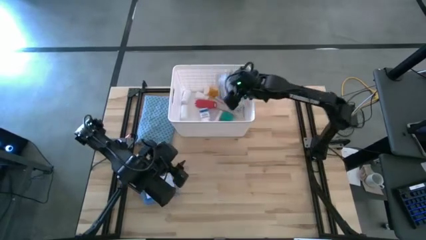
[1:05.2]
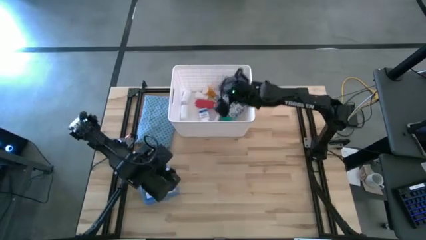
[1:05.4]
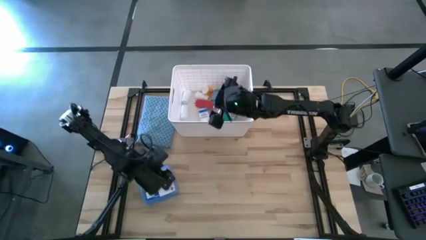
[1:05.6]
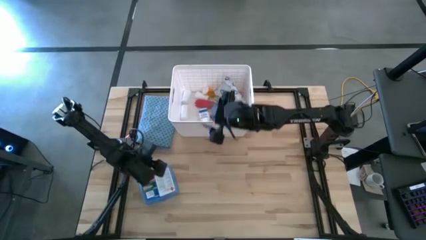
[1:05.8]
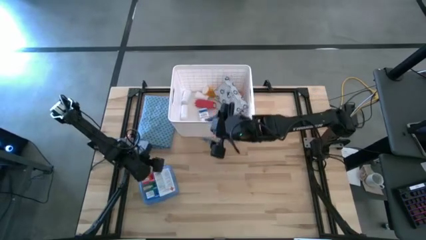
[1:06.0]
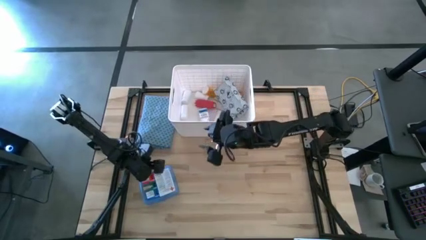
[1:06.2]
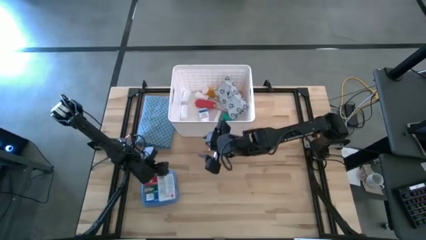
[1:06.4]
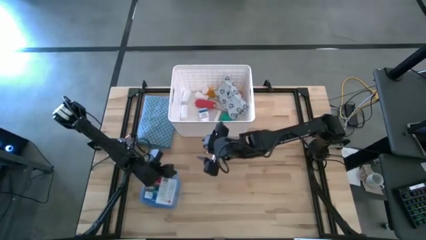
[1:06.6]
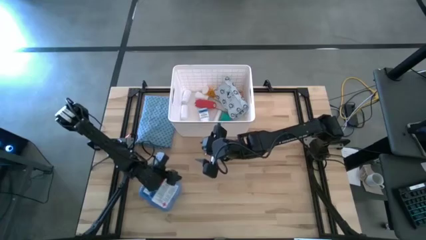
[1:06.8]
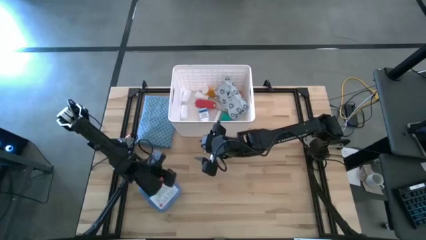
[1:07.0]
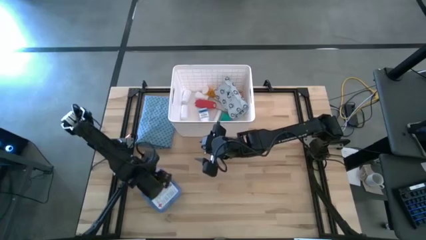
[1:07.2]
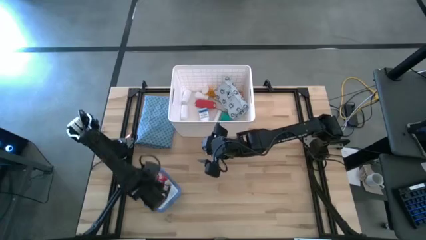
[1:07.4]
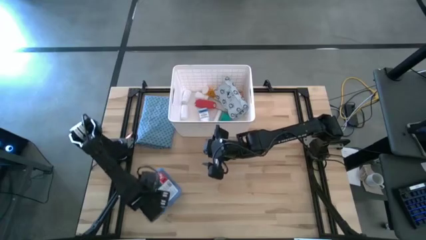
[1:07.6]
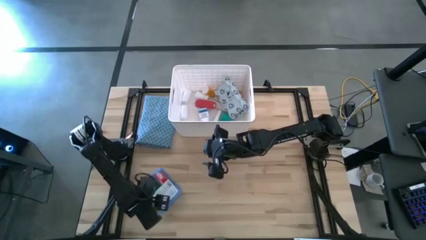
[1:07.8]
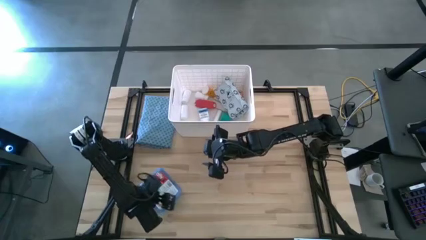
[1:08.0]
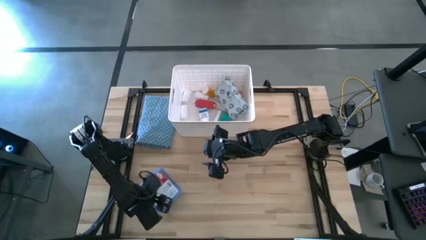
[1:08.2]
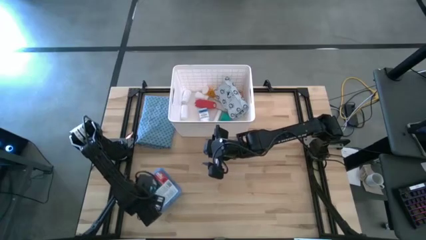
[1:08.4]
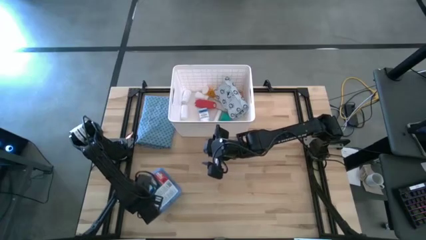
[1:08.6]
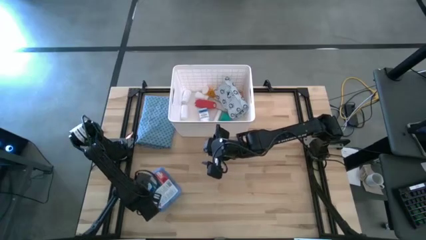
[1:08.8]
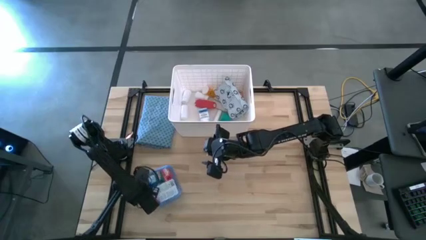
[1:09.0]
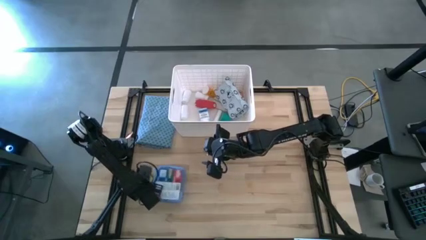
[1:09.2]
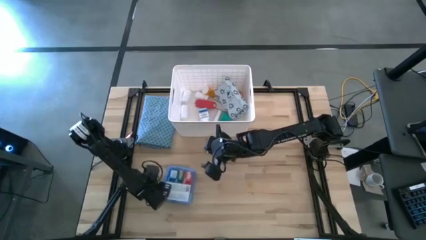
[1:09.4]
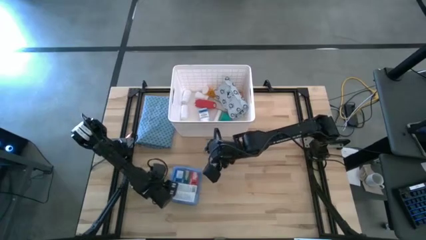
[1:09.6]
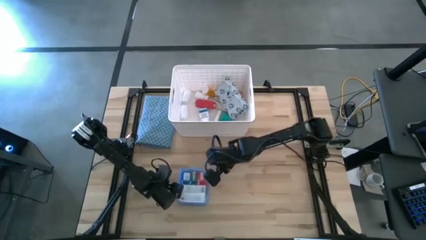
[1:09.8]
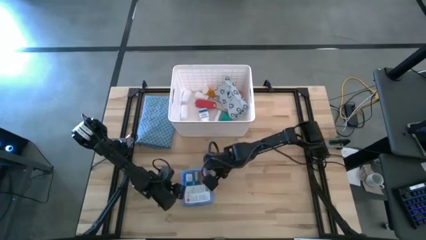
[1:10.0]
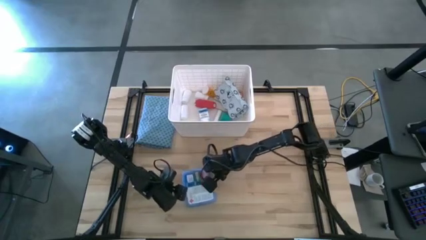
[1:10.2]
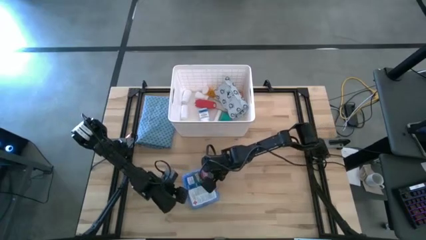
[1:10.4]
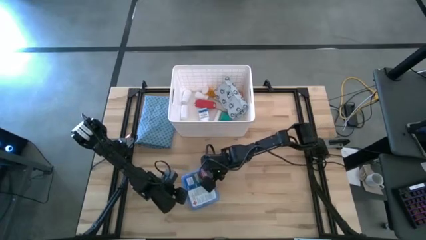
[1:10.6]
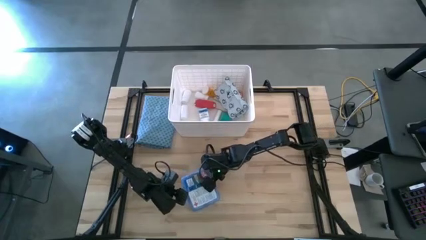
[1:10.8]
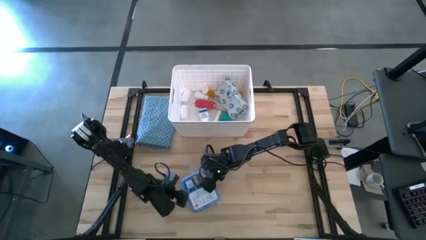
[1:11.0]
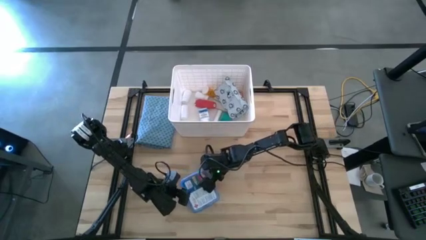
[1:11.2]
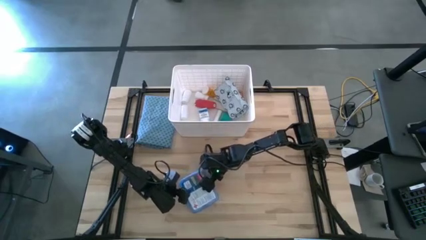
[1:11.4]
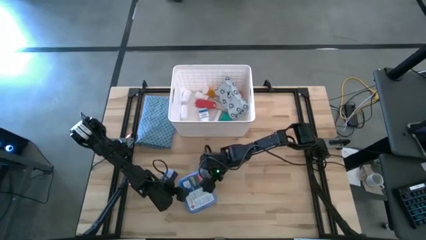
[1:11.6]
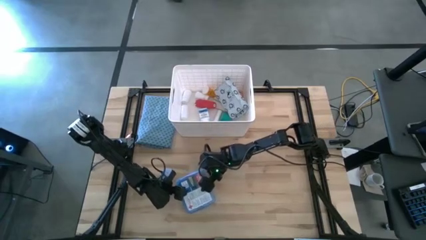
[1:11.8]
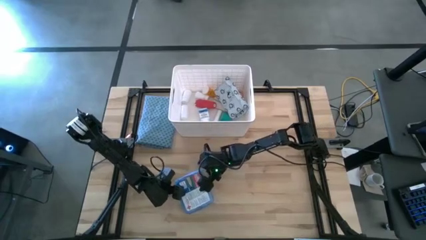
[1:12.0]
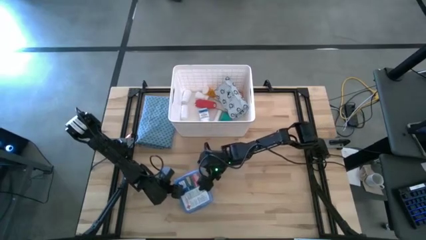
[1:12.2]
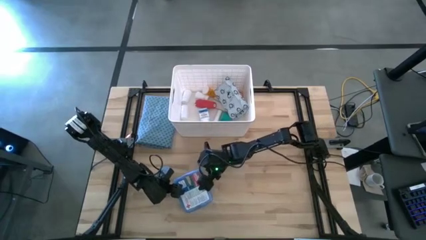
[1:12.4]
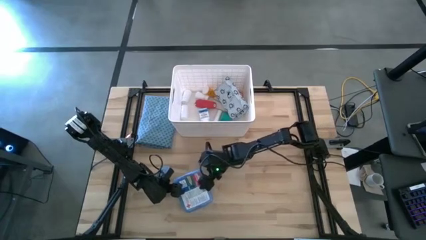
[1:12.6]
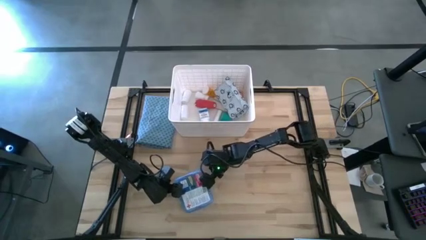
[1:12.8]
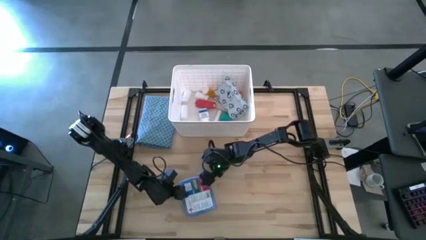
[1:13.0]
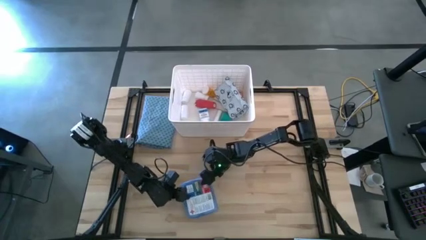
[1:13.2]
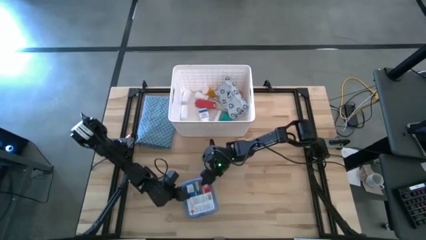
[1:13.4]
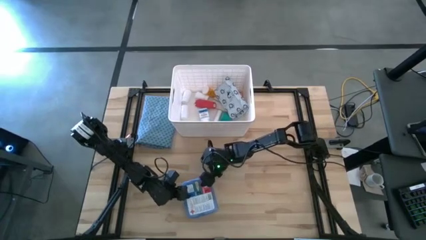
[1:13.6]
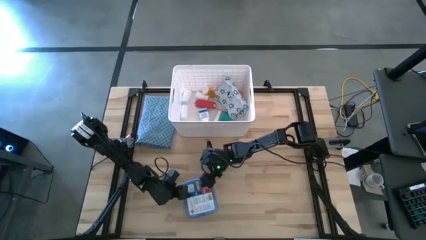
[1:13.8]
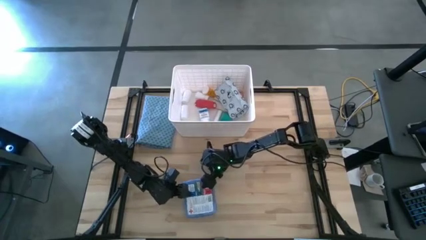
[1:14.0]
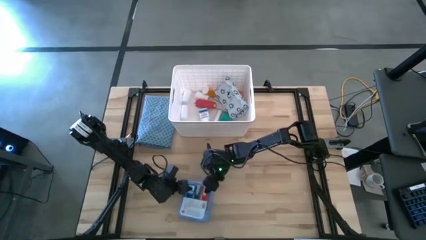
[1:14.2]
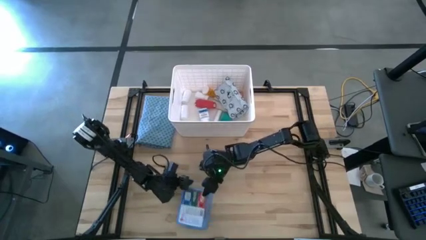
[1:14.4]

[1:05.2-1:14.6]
Task: Pick & place medical supplies in basket/bin
Put the blue first aid kit in the white bin

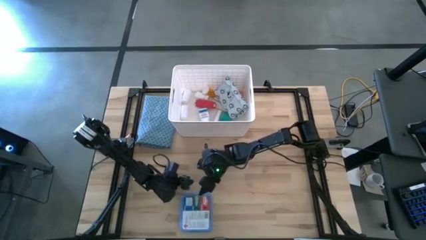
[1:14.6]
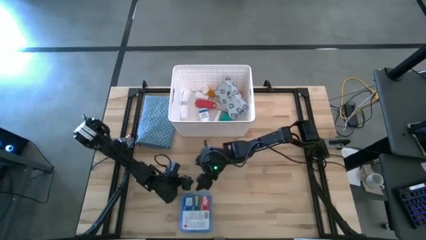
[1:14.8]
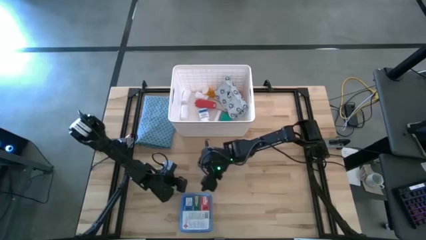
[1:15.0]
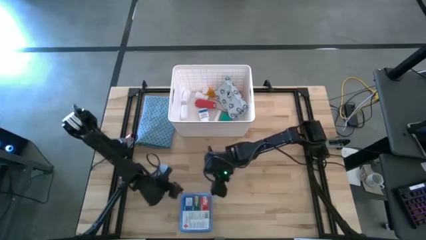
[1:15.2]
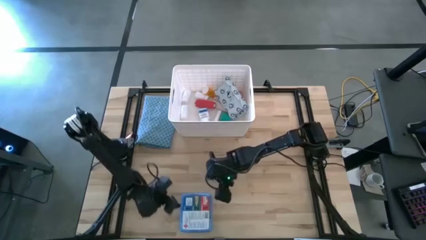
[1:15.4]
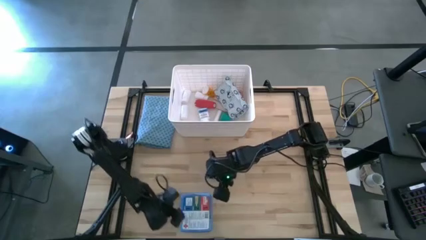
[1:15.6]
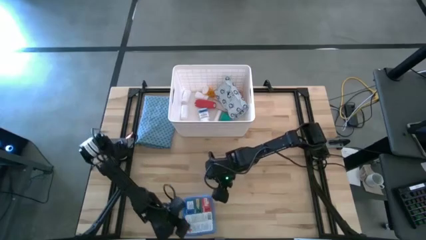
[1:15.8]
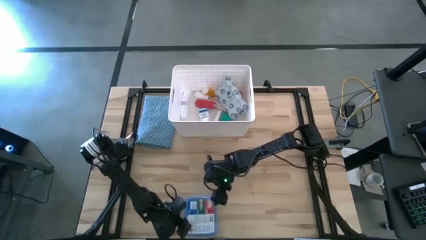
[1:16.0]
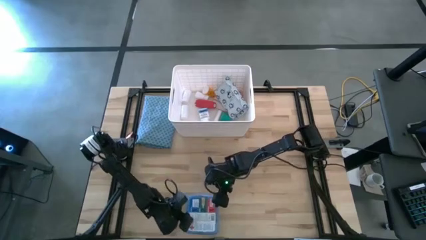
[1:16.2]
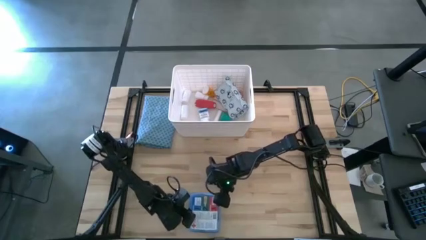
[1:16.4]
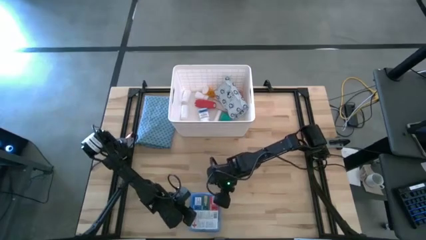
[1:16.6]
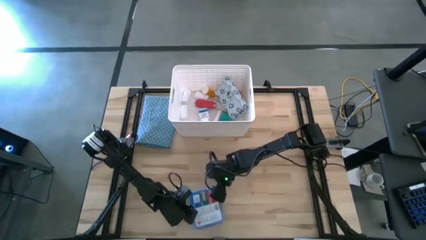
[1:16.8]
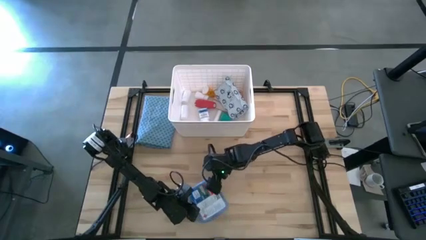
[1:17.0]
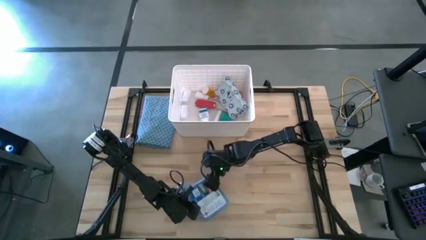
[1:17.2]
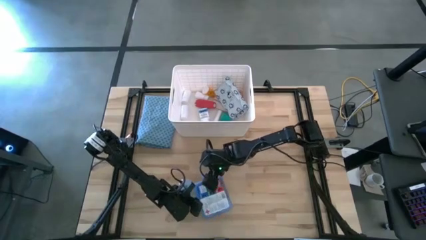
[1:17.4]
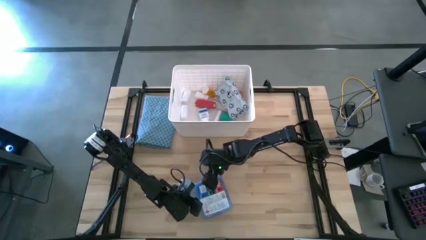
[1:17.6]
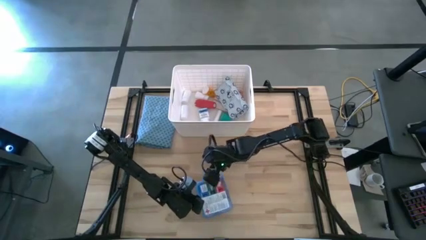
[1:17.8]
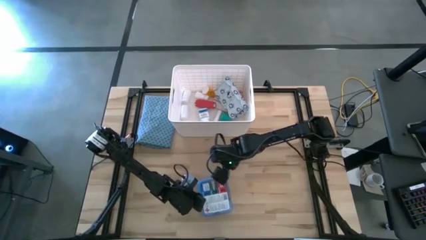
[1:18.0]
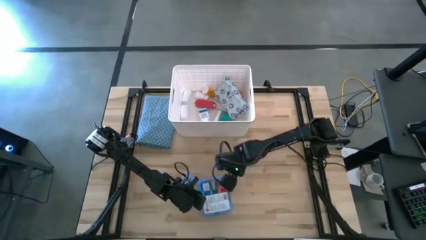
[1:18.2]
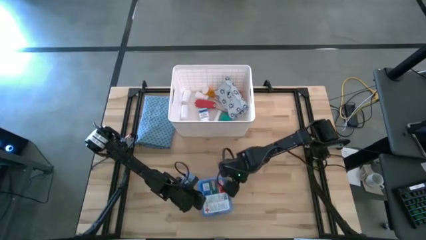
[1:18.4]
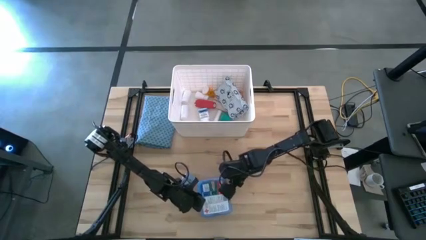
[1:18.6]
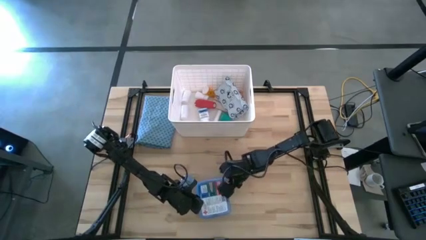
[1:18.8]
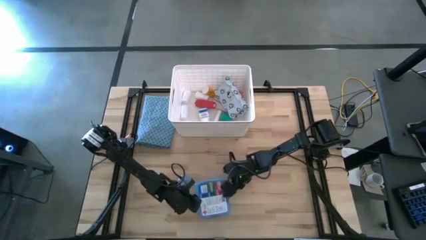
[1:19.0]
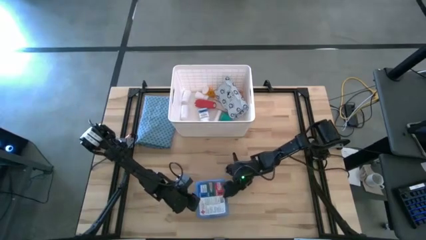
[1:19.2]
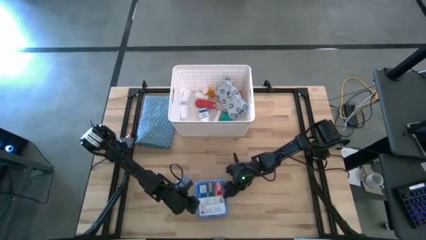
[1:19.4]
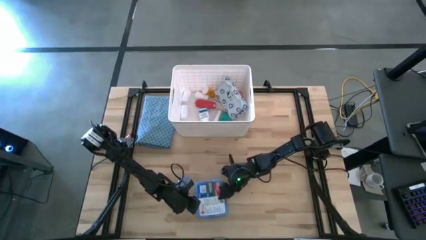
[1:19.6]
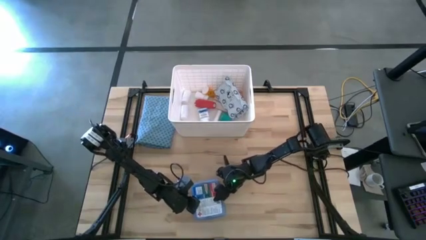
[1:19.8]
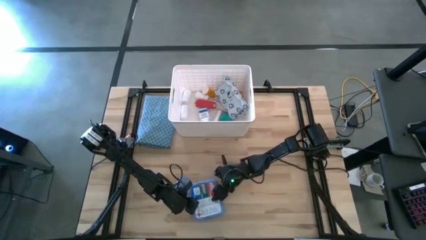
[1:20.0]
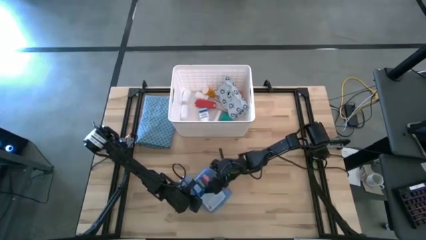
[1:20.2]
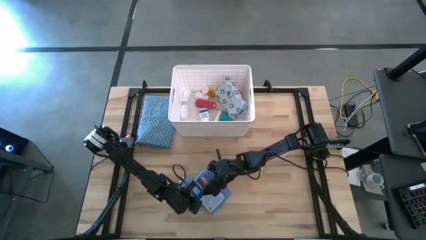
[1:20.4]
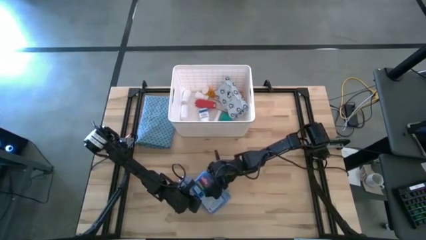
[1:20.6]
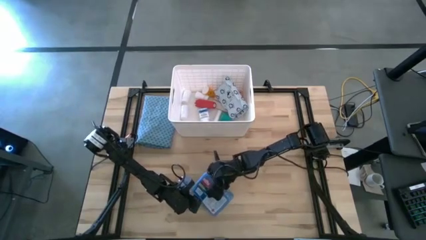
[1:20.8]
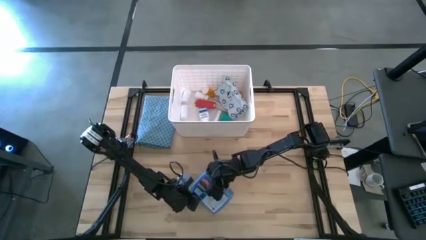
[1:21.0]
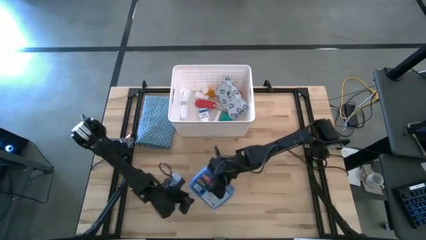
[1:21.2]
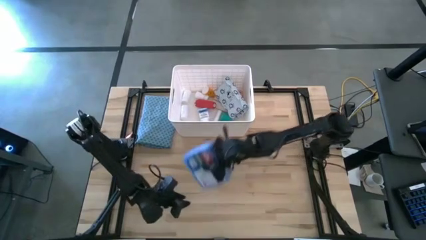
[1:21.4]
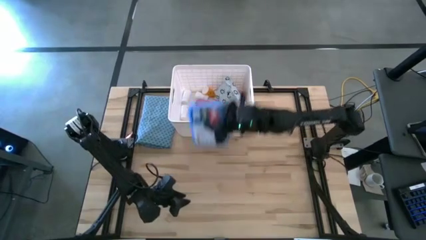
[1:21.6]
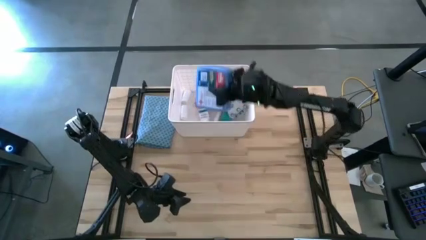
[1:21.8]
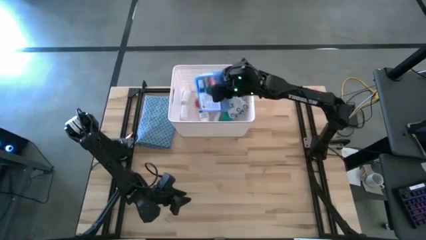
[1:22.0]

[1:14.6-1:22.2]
Put the blue first aid kit in the white bin
